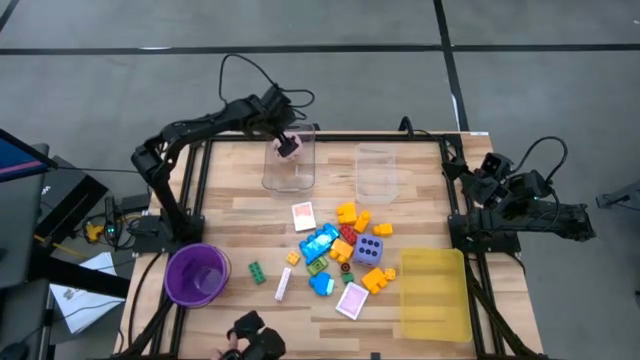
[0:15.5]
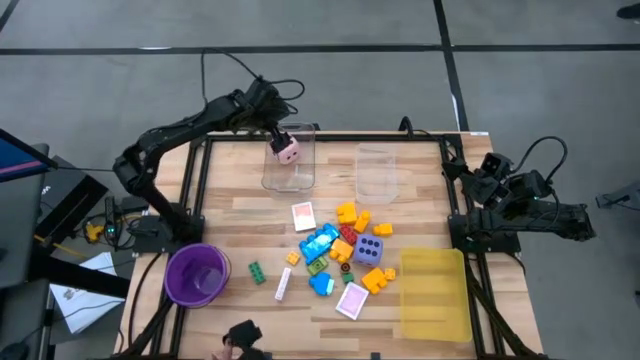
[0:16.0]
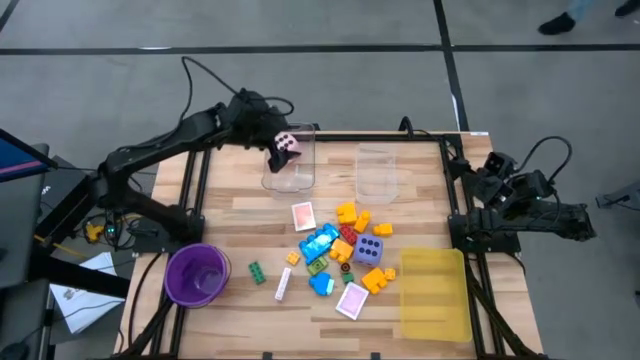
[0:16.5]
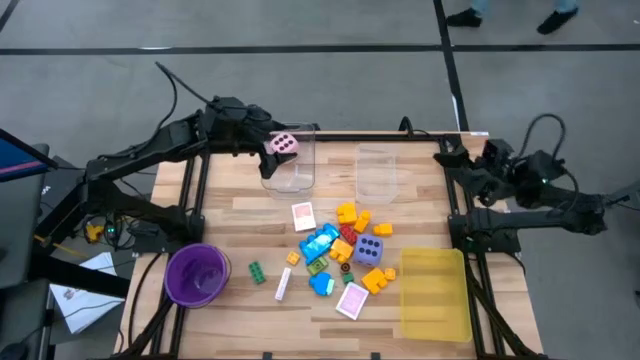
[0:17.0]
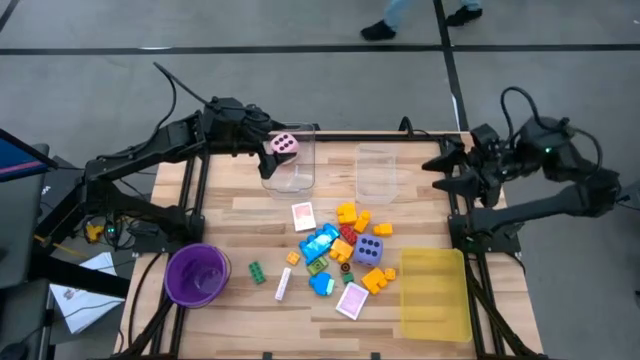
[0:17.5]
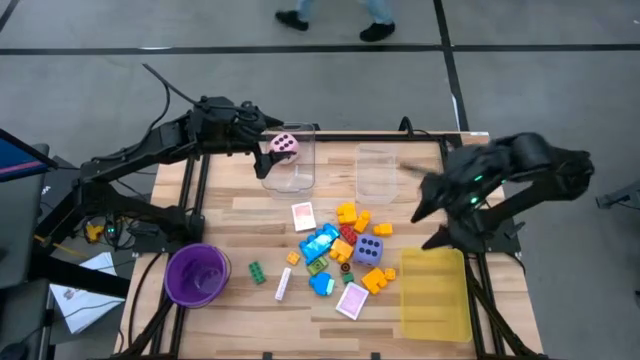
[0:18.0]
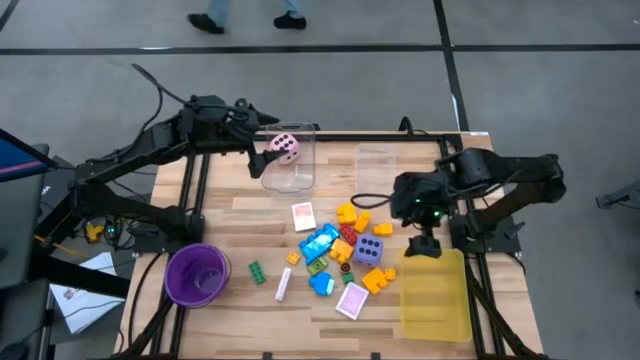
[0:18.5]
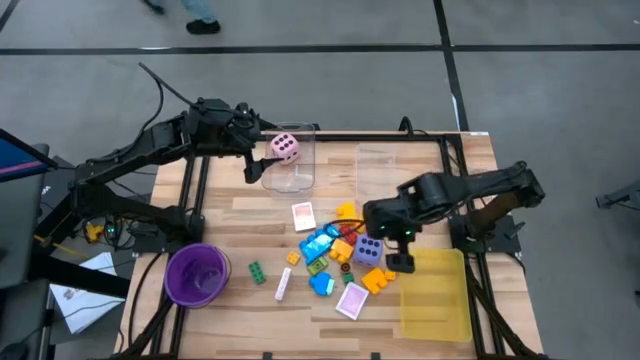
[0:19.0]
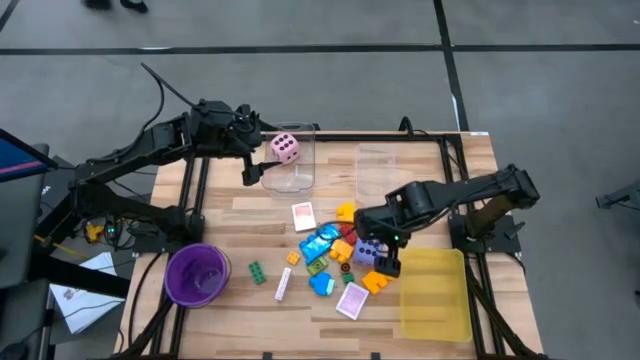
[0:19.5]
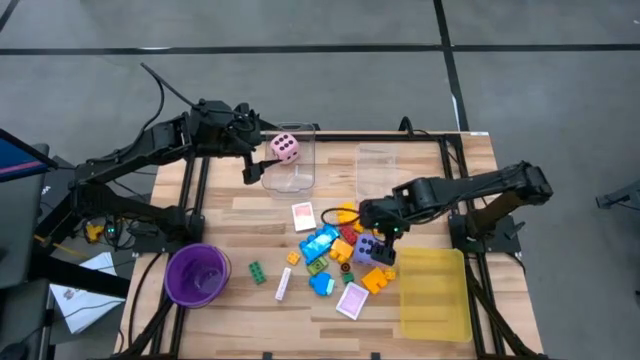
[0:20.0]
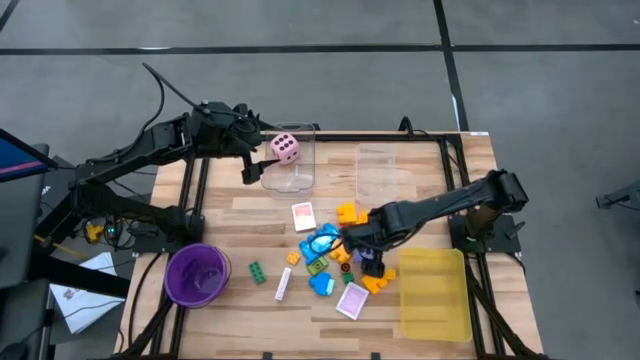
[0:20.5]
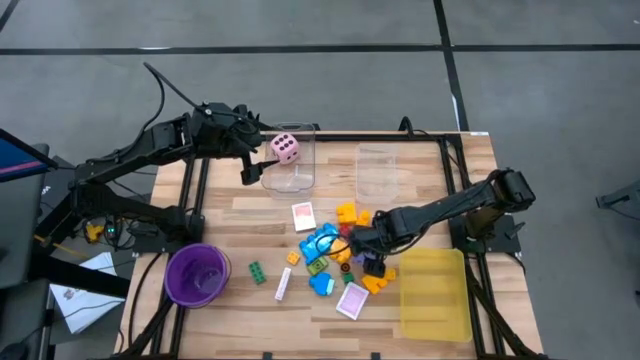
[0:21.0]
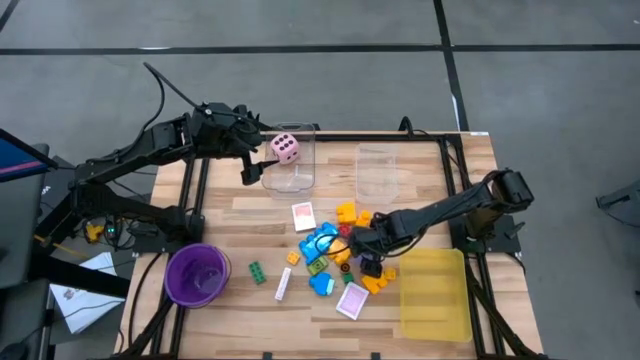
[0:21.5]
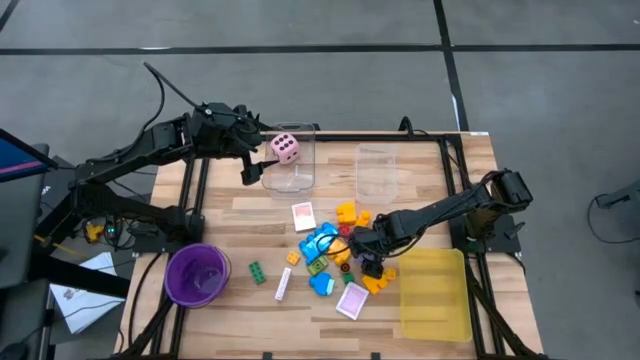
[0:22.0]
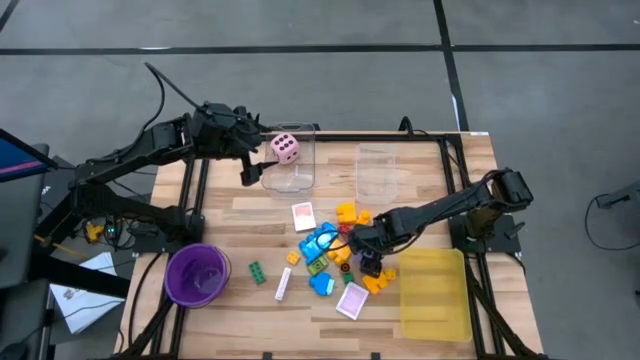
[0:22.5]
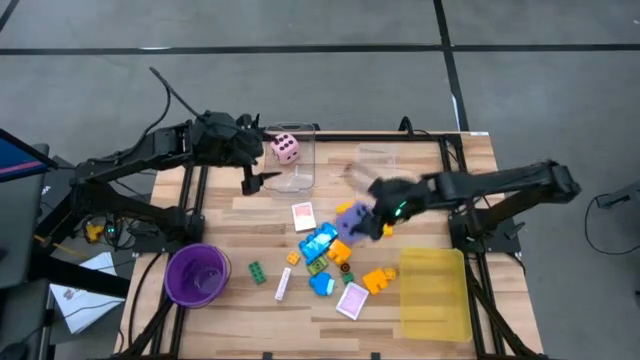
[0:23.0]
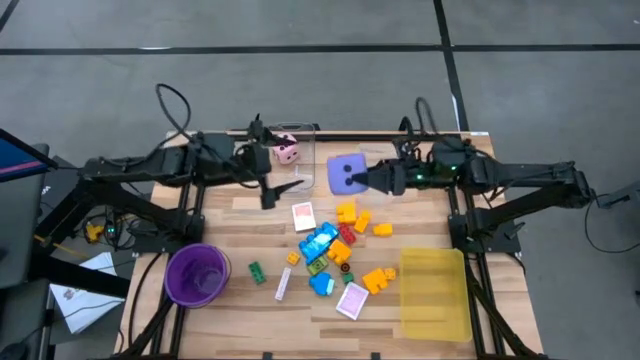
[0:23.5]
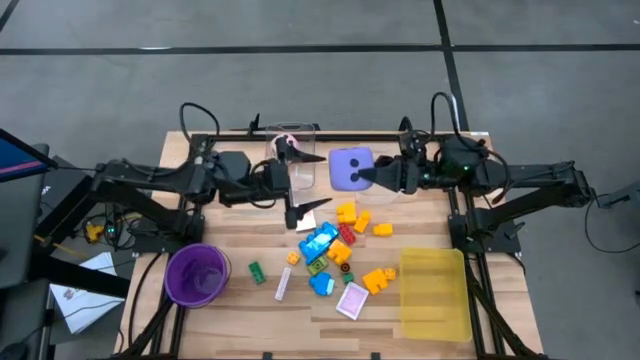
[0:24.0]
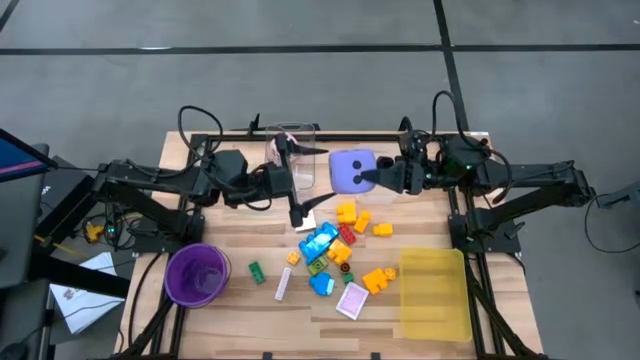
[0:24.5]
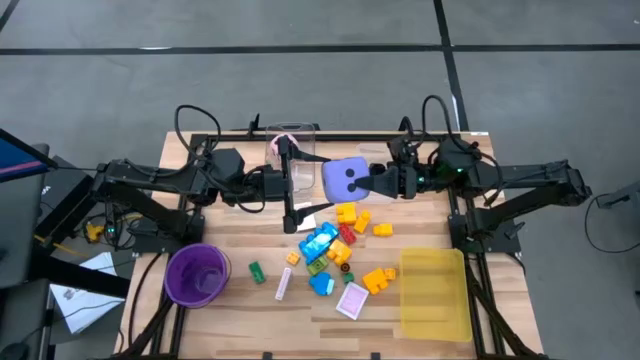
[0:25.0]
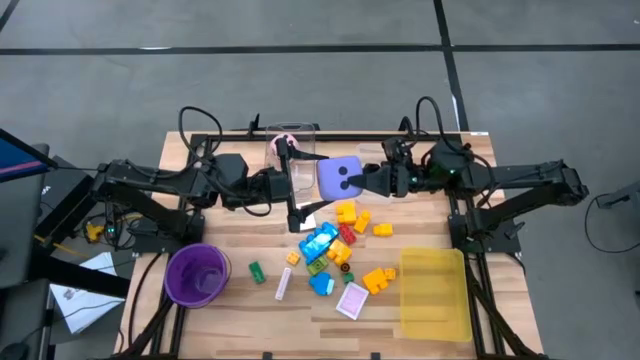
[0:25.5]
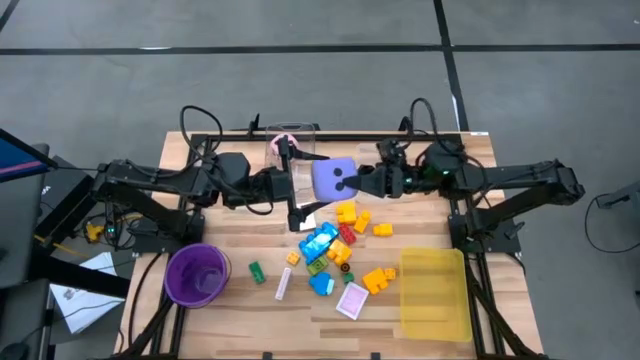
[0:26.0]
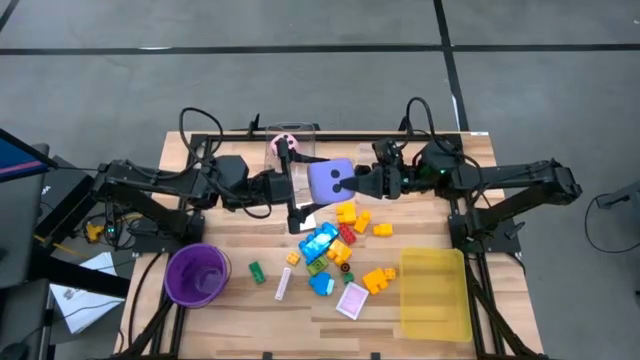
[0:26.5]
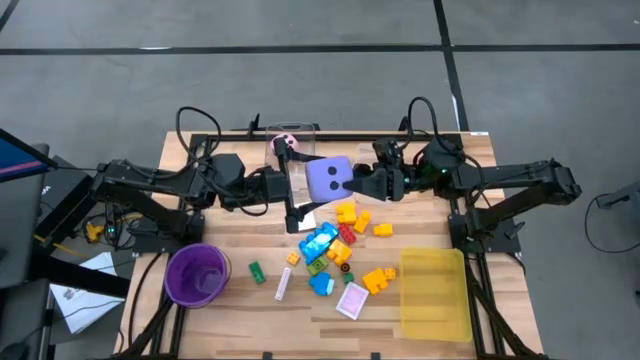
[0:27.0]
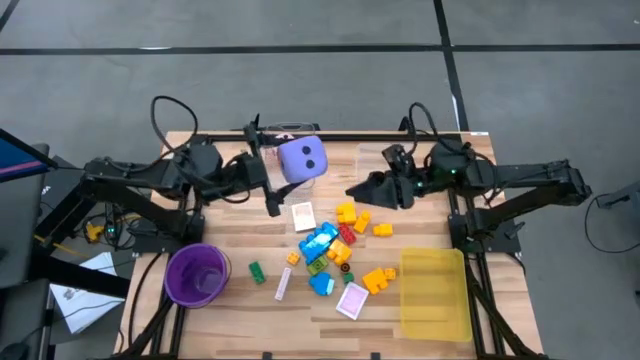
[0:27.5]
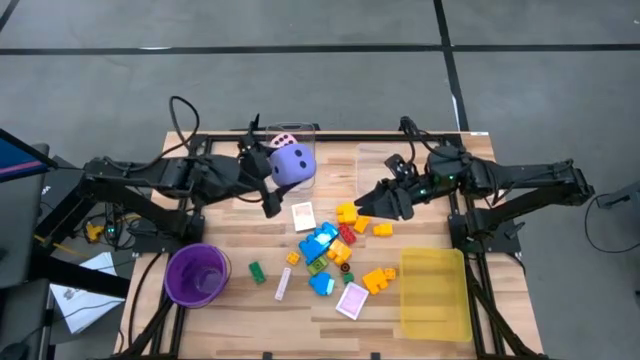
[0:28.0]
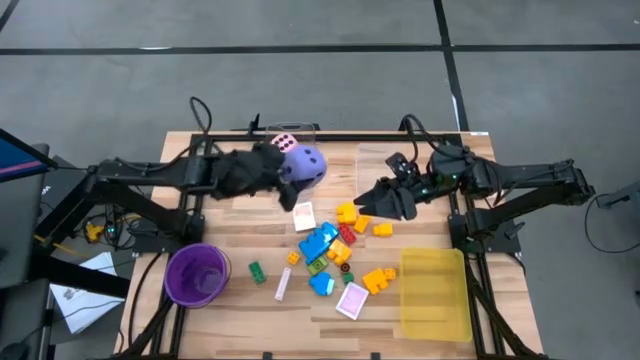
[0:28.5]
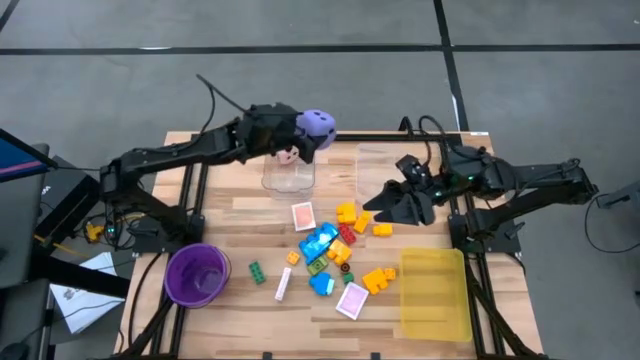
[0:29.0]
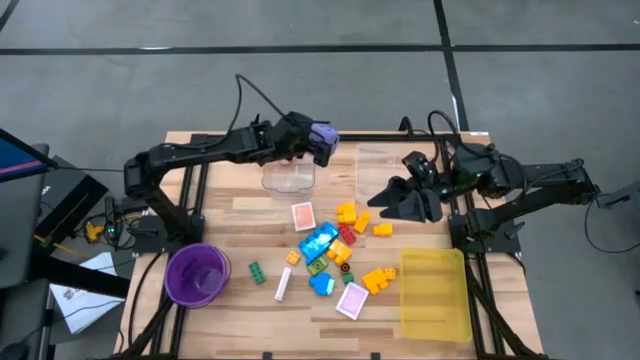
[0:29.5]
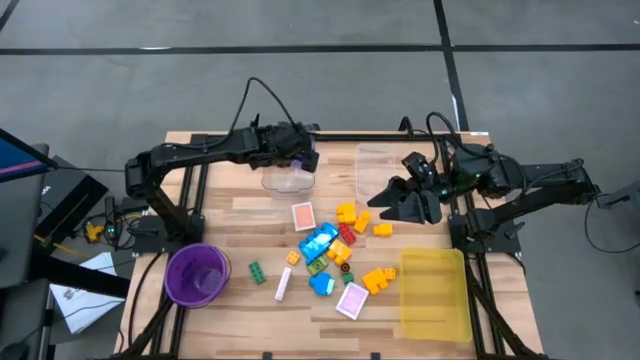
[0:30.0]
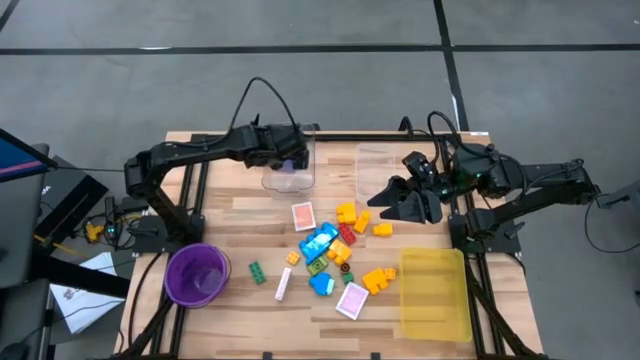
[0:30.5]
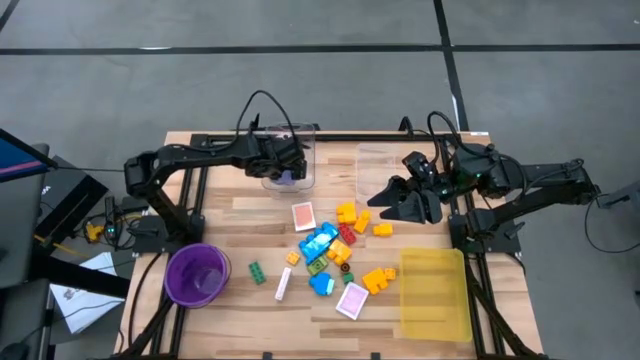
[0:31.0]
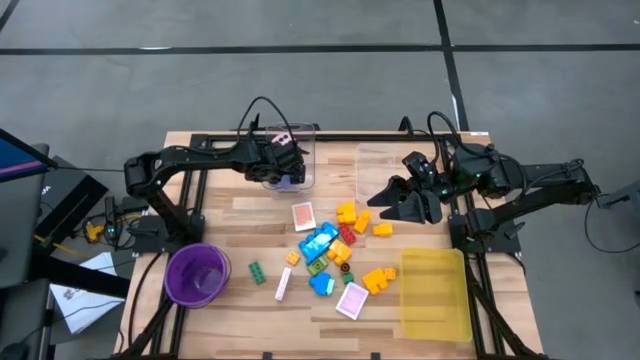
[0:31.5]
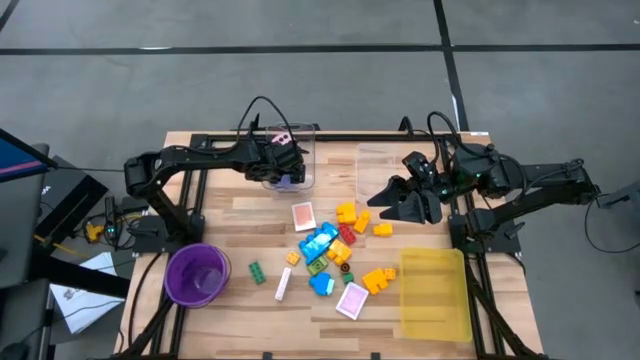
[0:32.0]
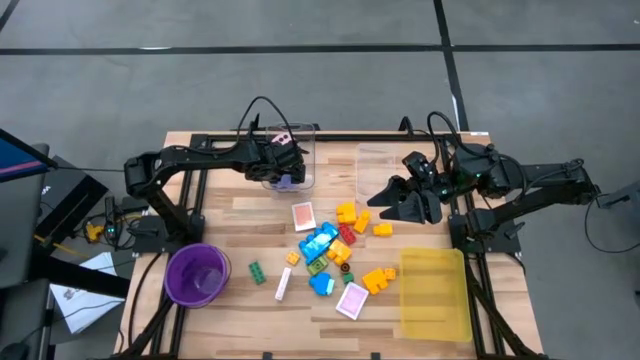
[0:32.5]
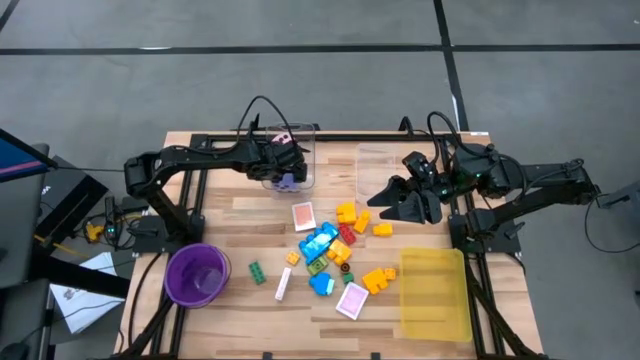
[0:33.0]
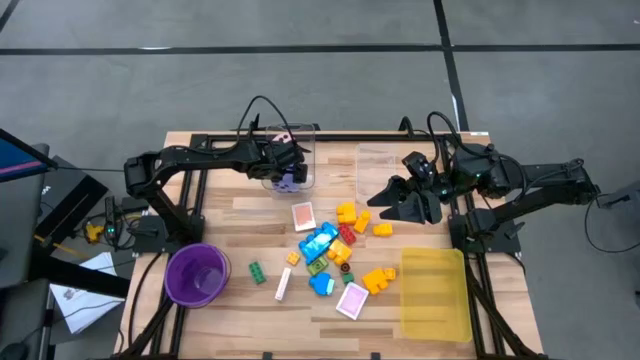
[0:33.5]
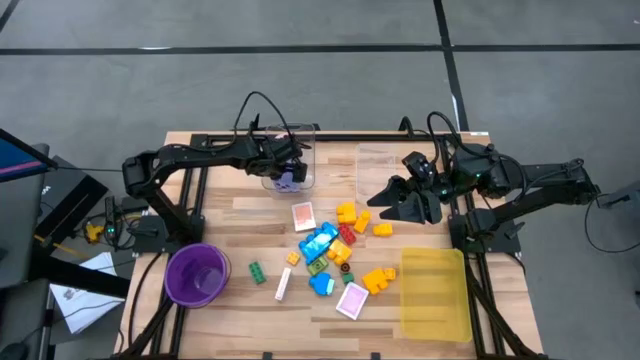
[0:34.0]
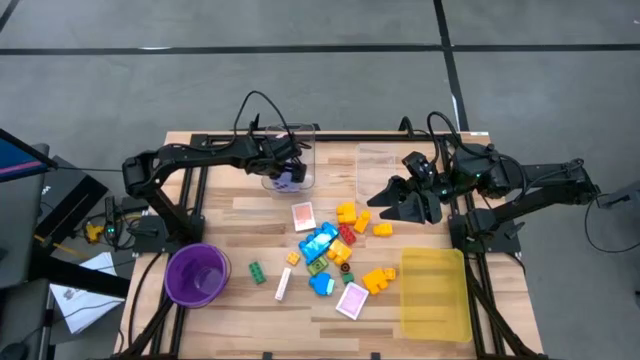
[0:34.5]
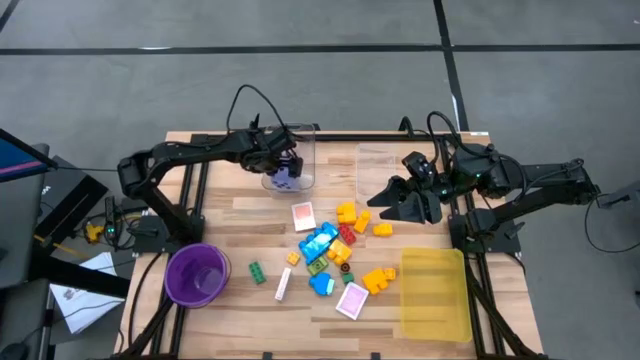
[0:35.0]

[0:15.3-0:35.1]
Task: Pick & Place Toys
Put the violet dice into the left transparent bin
